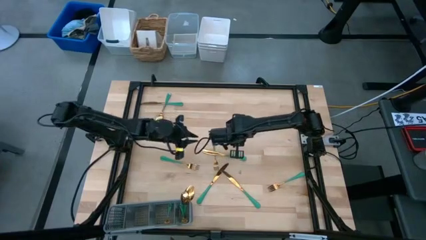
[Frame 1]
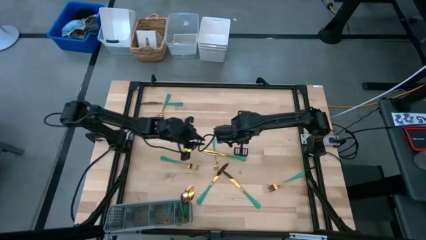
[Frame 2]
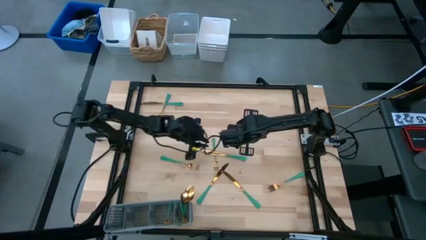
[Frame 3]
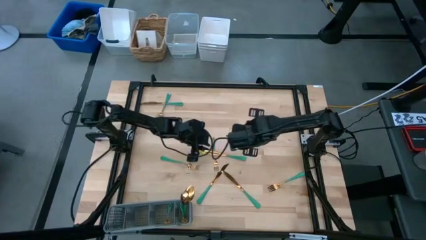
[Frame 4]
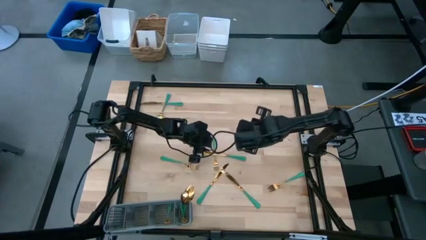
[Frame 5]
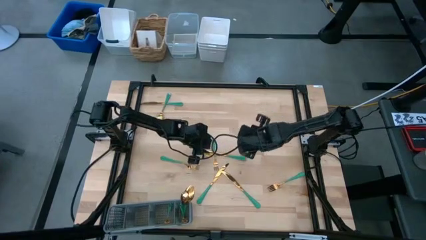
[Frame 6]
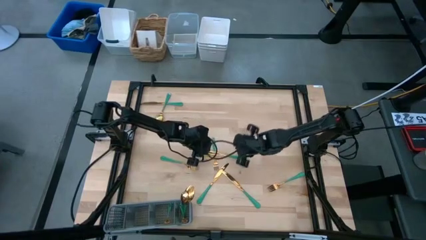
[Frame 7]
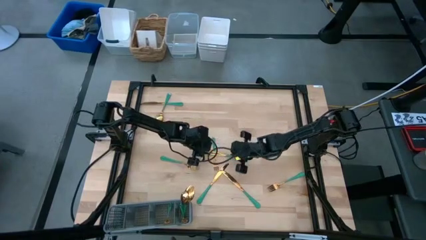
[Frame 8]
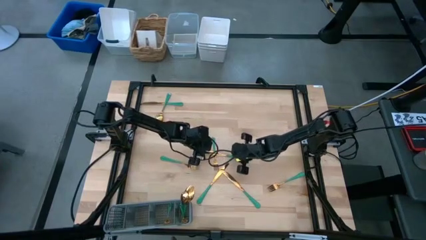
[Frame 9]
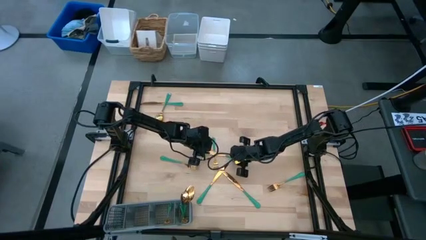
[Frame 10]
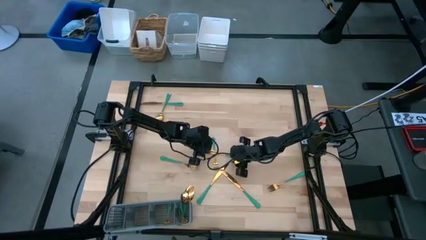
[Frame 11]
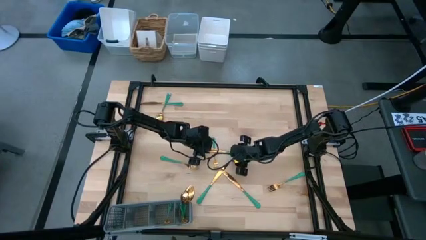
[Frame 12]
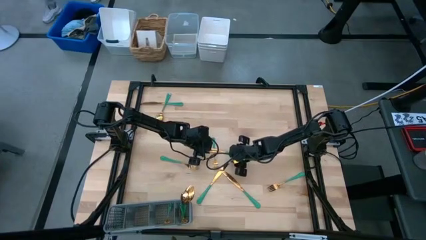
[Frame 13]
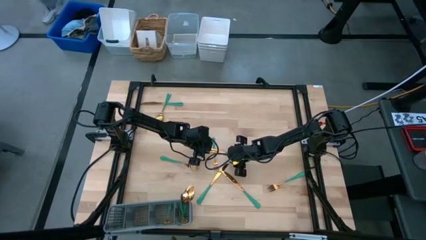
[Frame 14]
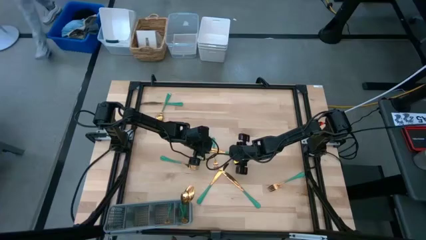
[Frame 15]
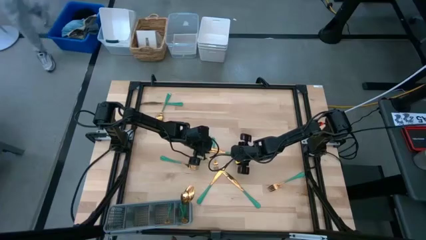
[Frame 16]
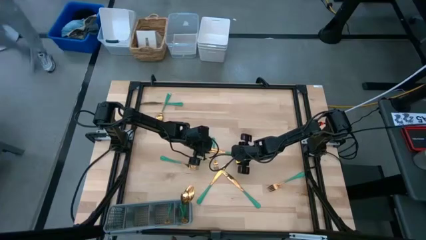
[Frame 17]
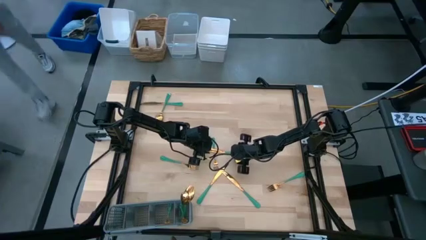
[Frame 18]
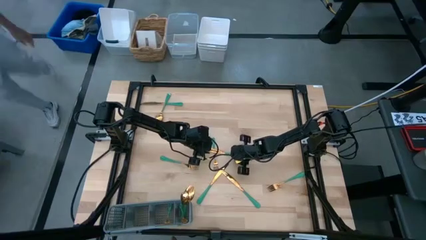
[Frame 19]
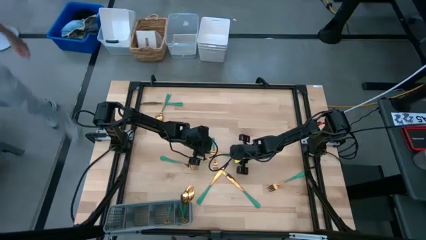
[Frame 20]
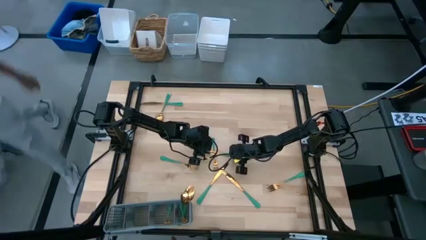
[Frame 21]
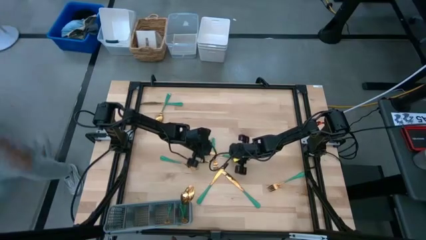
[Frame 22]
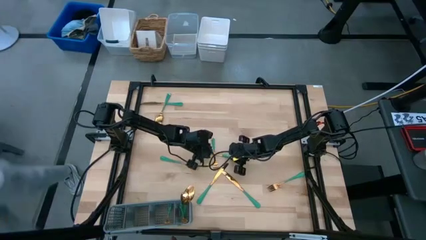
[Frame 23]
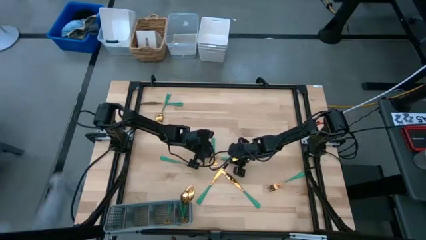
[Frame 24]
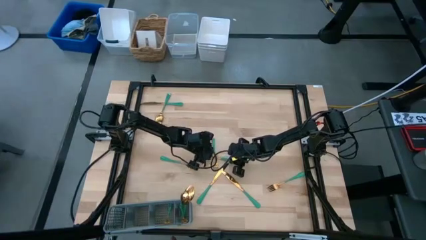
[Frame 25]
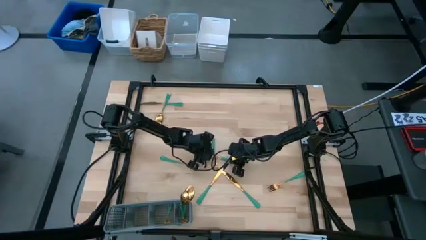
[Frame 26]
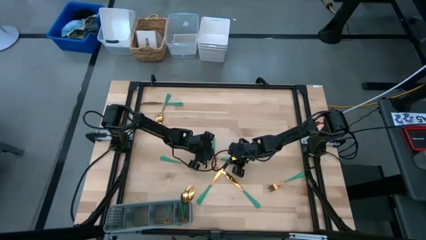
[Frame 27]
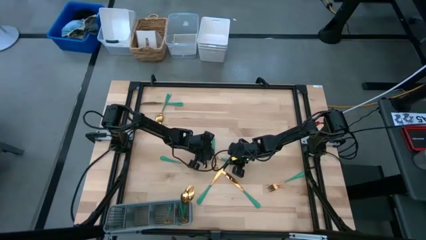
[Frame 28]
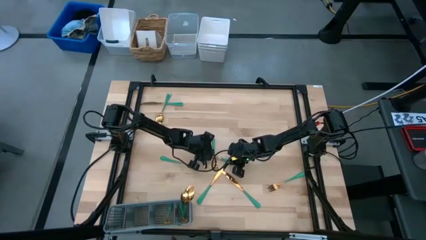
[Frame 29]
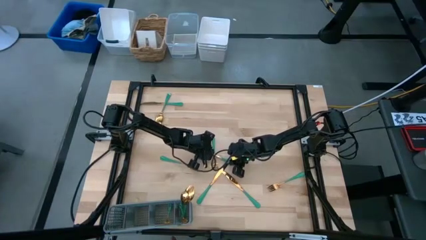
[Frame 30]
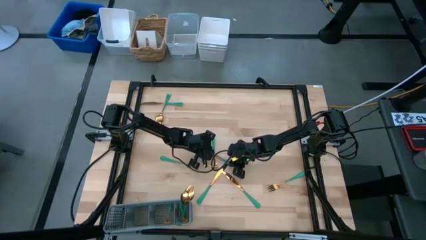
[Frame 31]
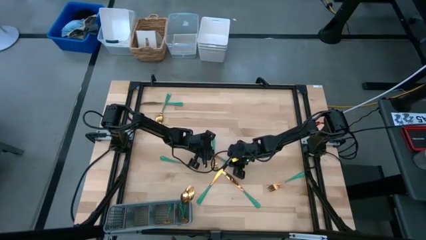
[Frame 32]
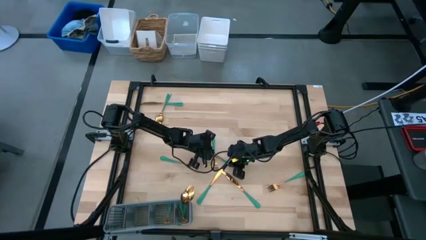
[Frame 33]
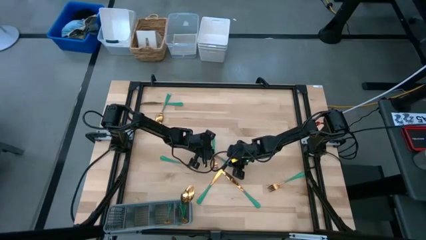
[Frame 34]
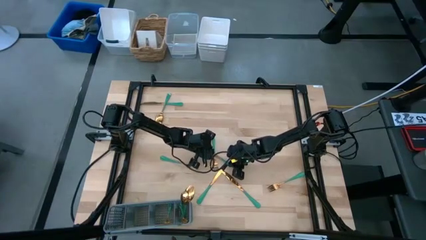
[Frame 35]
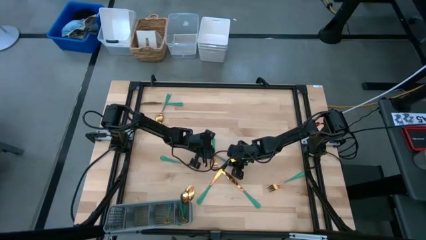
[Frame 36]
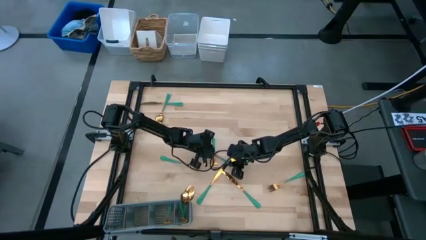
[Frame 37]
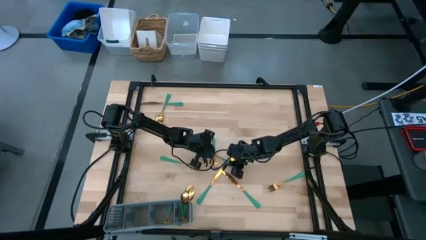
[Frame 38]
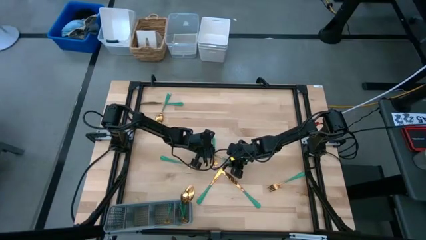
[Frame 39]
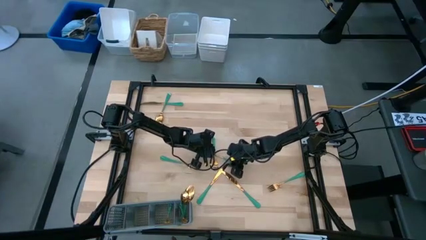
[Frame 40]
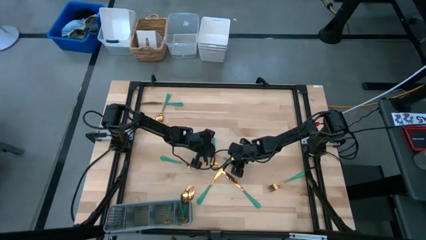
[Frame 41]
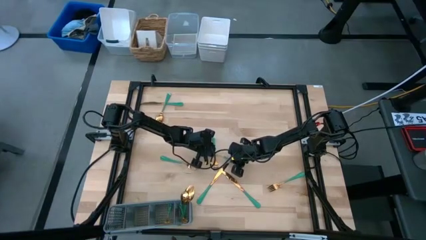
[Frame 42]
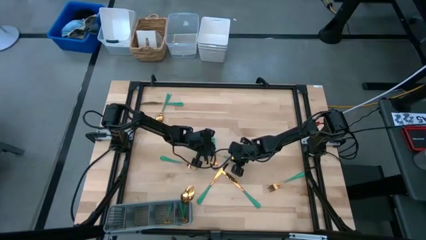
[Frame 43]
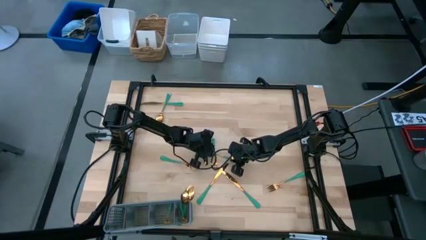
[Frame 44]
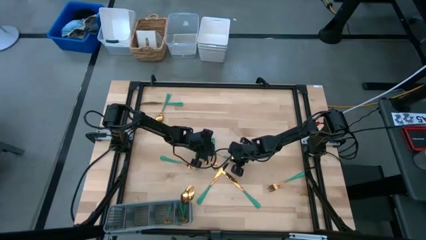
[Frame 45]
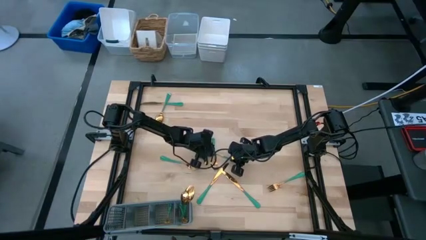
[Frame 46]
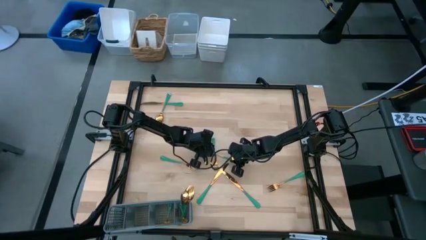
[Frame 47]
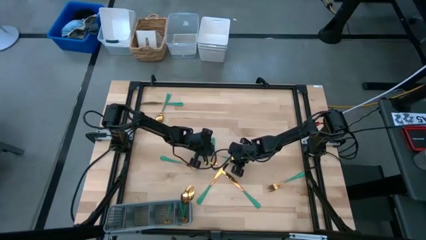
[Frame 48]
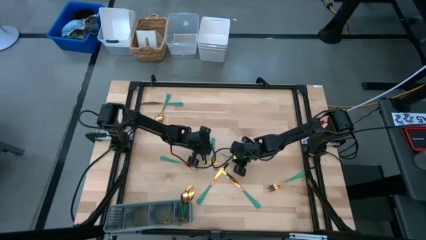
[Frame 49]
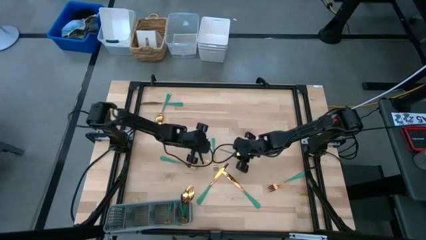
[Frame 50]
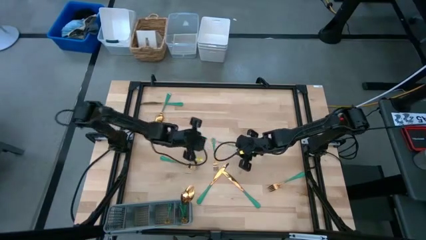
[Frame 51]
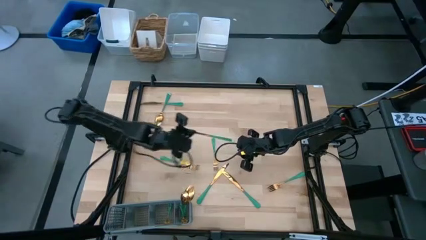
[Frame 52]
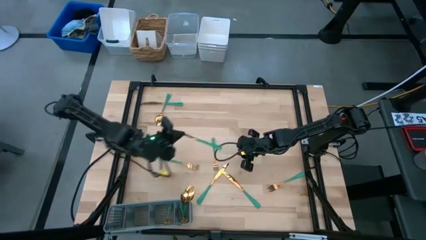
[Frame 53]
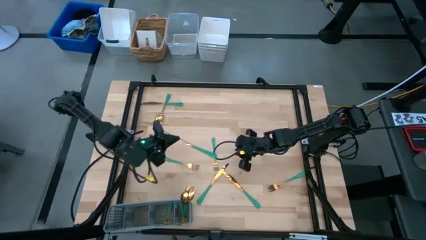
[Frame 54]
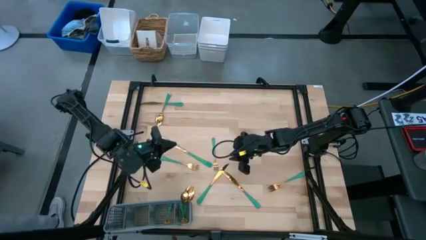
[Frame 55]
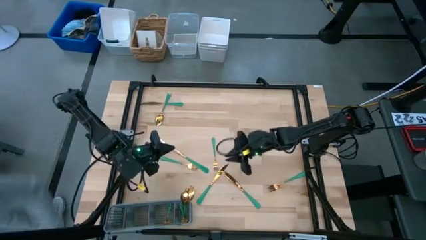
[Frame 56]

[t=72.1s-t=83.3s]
Task: Sort silverware
Put the right knife into the cutlery rack
